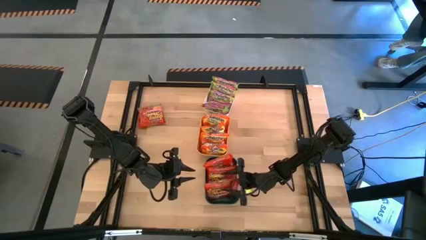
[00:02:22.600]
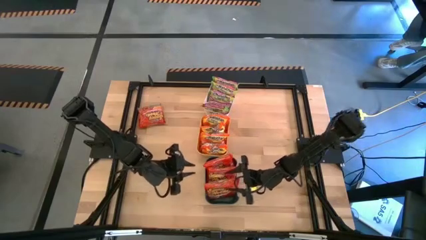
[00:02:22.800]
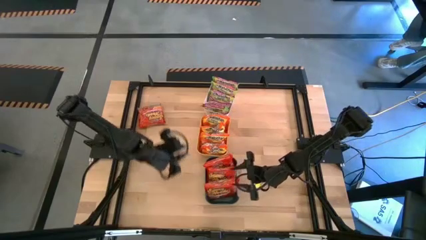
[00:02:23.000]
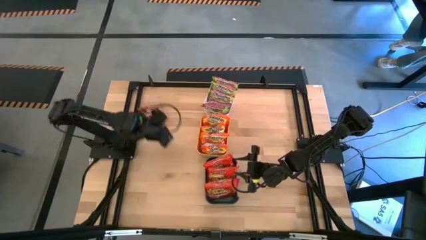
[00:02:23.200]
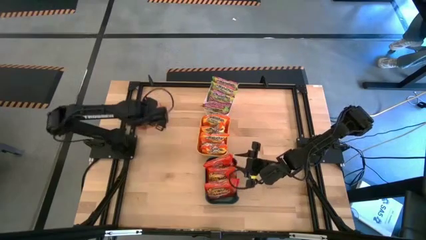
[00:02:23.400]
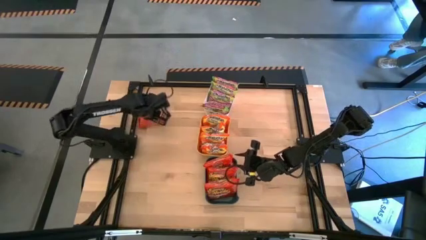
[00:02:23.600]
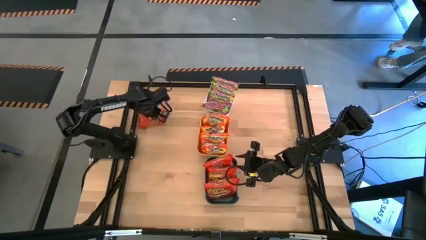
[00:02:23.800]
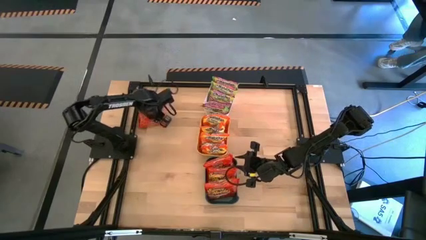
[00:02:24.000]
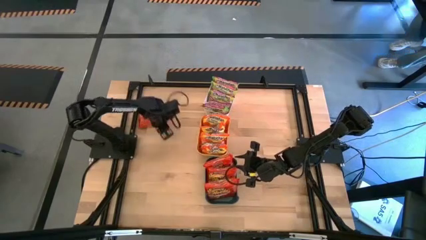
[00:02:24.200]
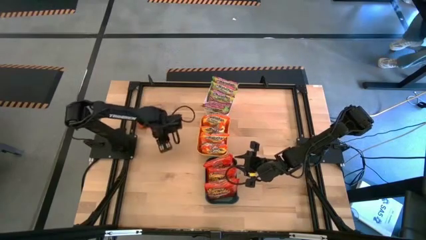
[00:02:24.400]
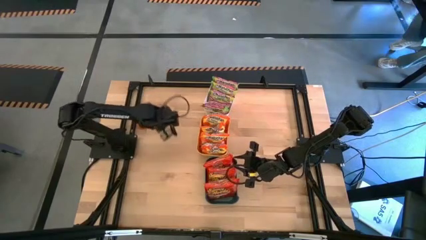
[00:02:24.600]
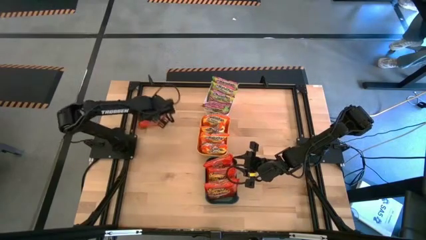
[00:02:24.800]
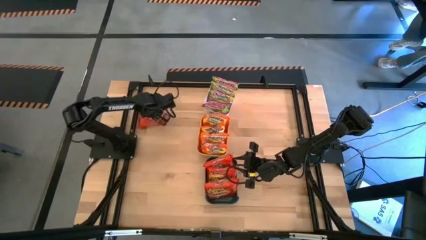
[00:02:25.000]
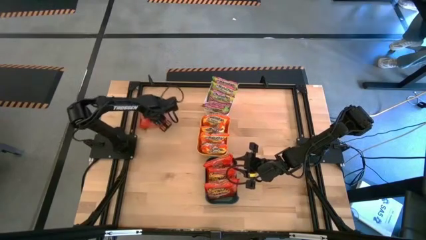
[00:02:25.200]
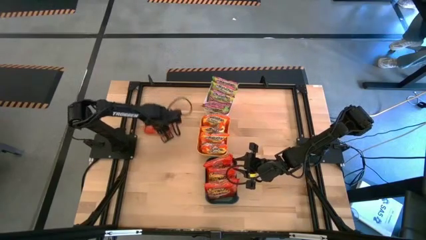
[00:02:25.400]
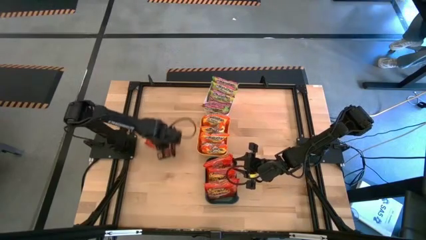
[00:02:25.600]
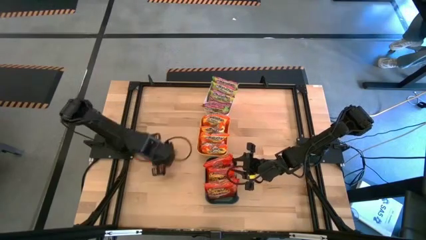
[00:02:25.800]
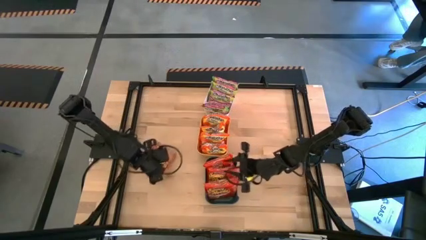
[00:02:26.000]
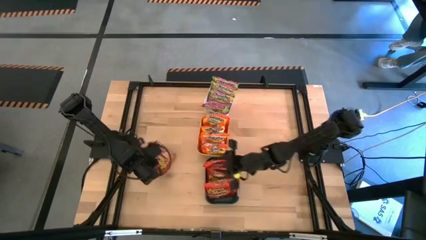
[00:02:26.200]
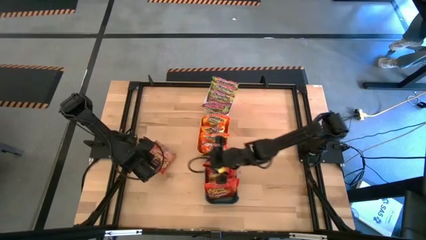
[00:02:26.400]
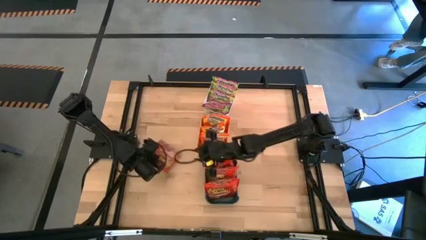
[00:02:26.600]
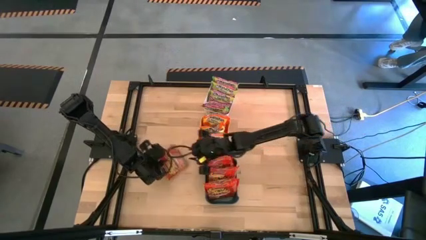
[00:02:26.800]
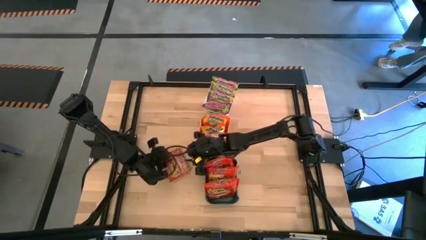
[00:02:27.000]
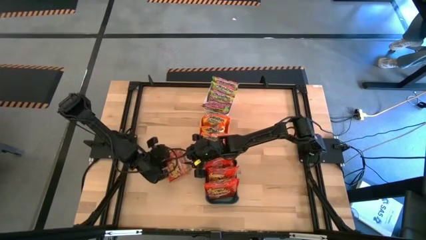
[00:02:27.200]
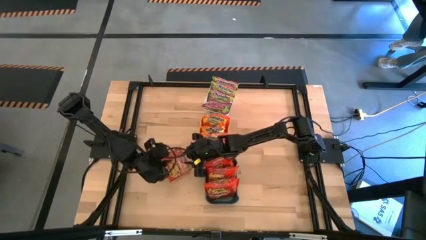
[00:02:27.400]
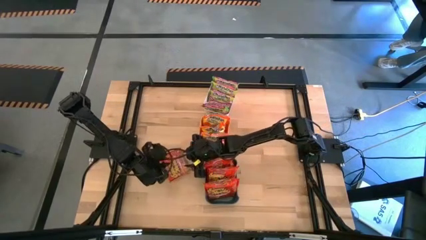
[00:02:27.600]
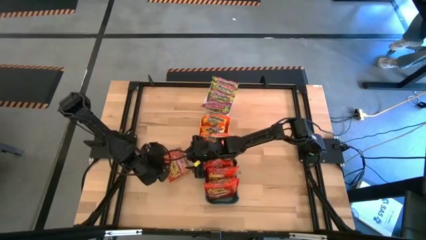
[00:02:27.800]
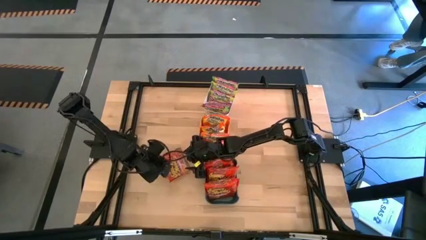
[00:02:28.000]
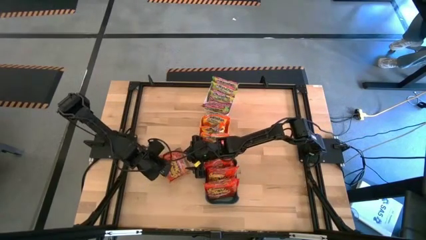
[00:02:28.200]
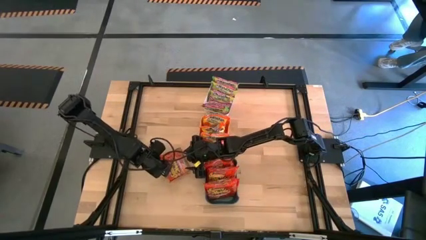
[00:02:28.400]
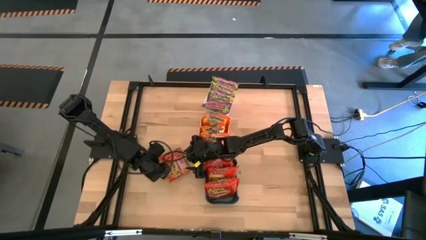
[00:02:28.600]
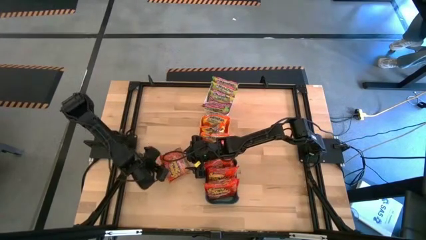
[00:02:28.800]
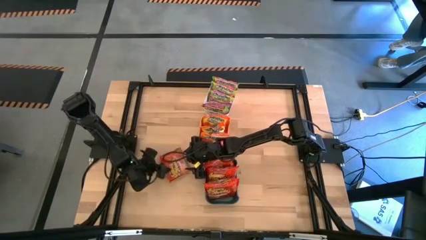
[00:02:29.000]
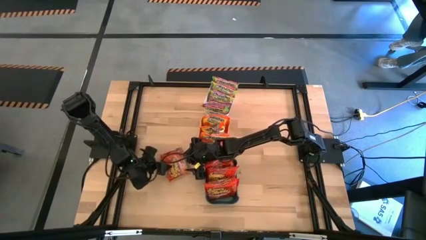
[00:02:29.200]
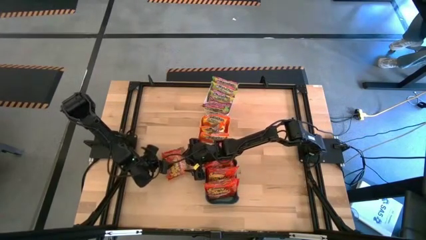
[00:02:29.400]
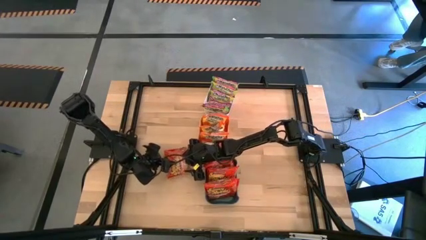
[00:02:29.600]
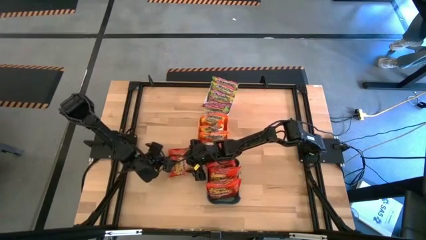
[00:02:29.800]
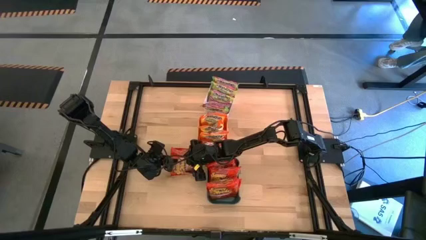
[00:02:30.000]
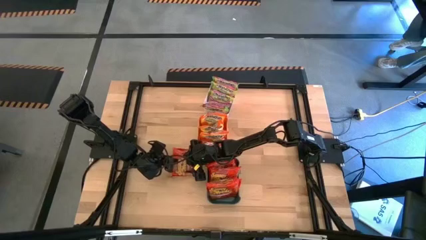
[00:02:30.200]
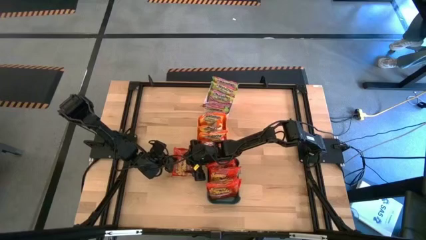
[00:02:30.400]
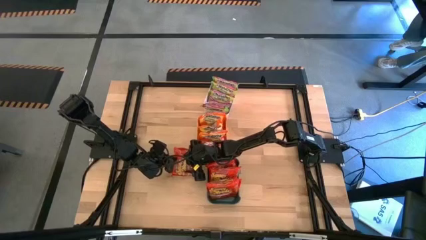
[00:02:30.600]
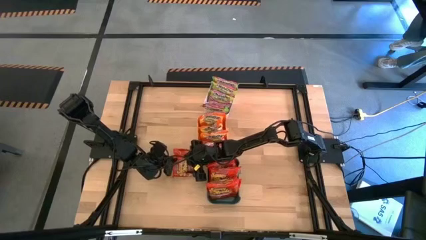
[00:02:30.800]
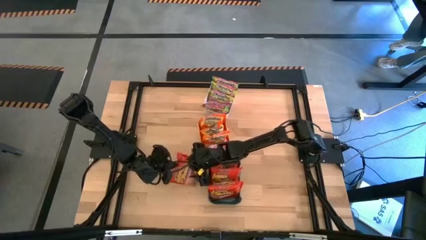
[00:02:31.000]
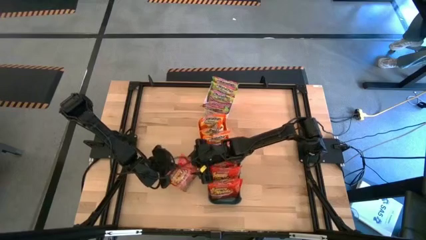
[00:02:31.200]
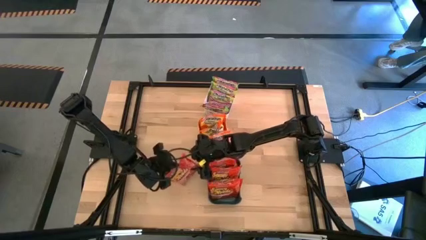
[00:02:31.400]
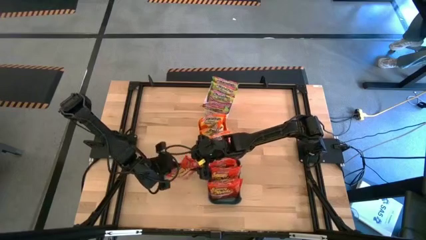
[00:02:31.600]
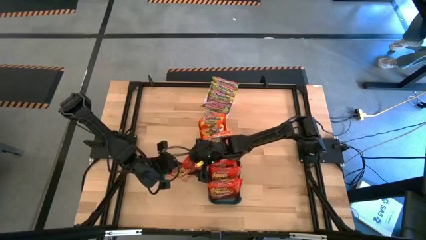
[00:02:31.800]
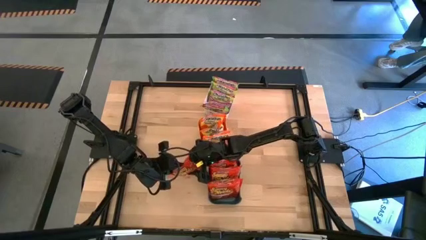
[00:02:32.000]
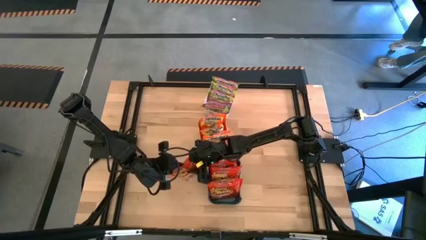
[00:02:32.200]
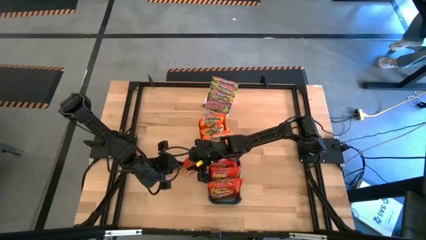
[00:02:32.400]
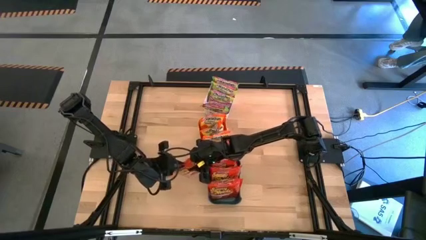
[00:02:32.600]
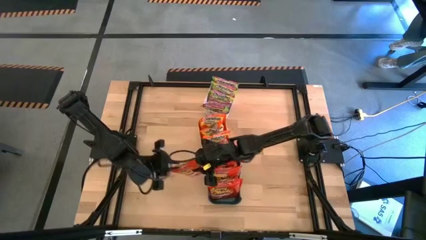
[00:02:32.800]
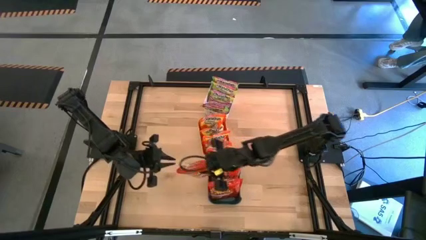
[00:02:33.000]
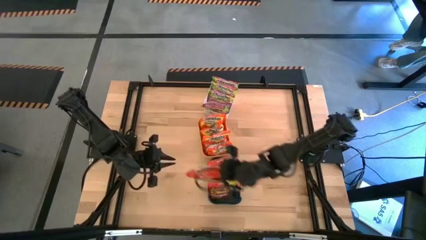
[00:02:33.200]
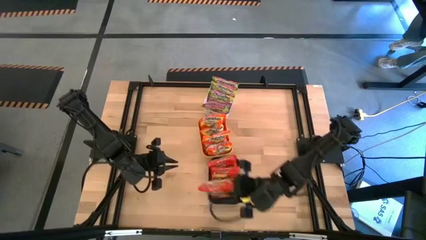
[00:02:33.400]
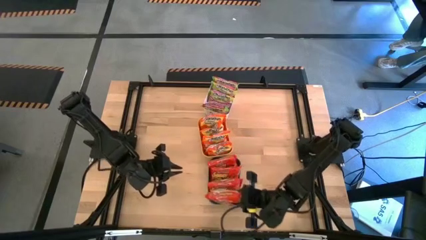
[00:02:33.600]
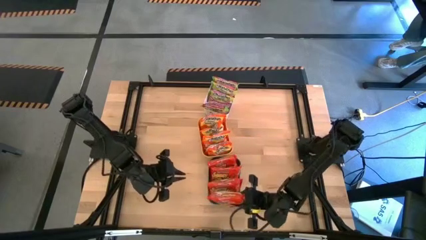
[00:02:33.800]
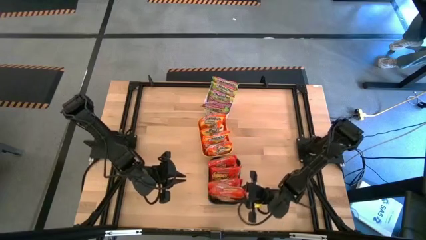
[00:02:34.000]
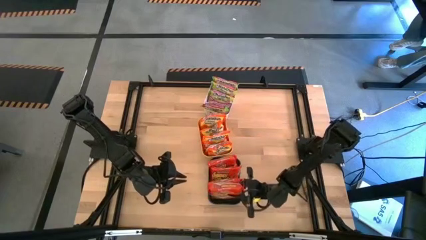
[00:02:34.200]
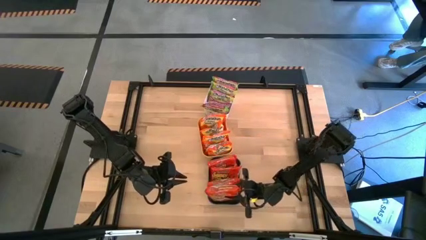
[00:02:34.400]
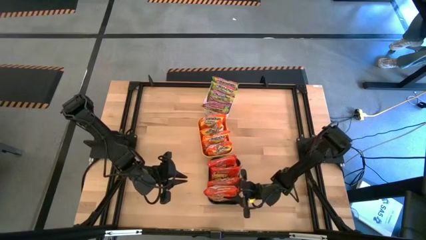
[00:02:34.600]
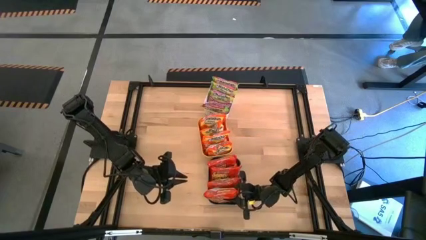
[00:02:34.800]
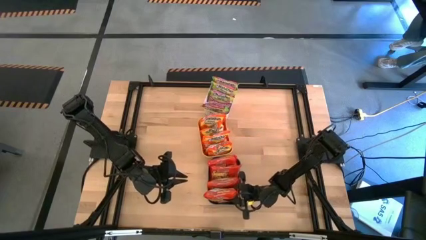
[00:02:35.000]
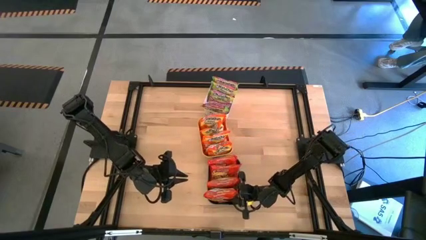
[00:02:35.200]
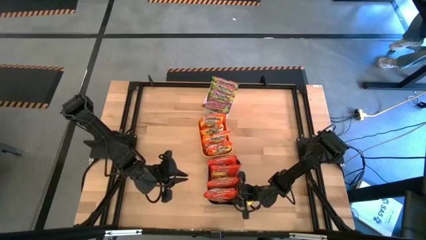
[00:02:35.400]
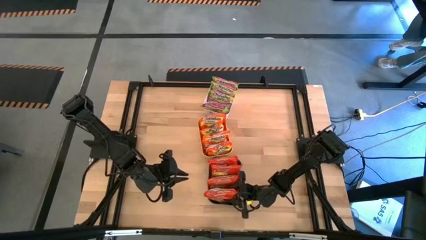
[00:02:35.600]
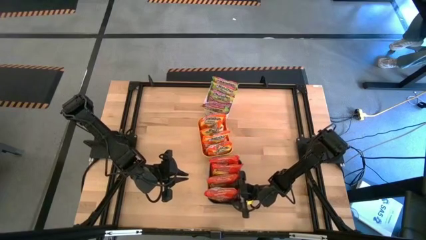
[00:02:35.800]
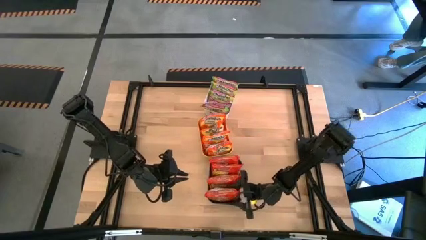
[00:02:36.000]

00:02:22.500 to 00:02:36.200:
Task: Sort Maruchan noodles
Put the orange noodle pack into the blue bin

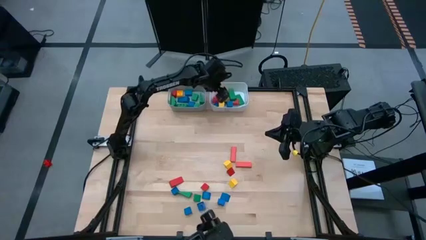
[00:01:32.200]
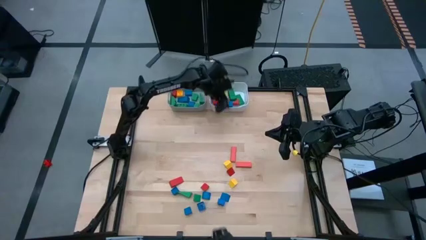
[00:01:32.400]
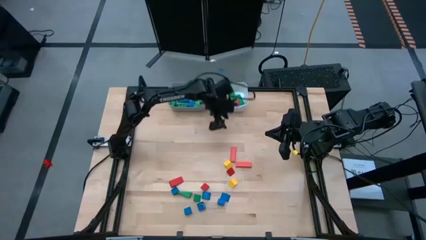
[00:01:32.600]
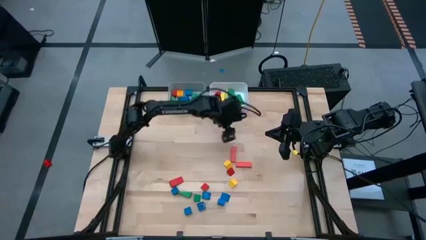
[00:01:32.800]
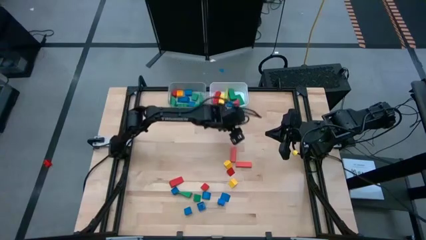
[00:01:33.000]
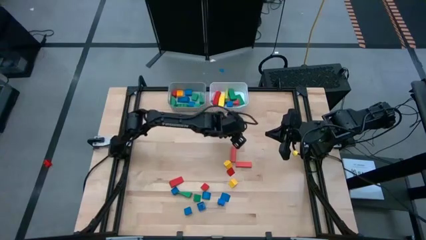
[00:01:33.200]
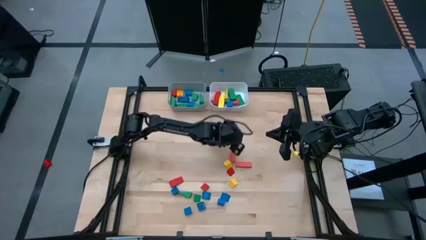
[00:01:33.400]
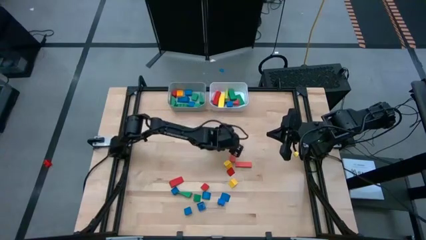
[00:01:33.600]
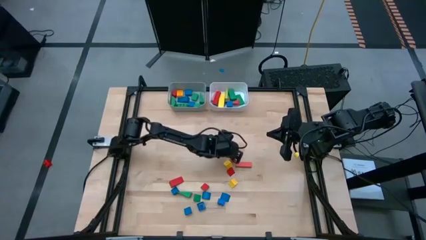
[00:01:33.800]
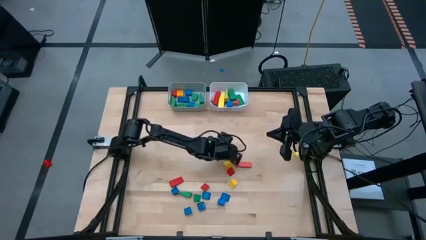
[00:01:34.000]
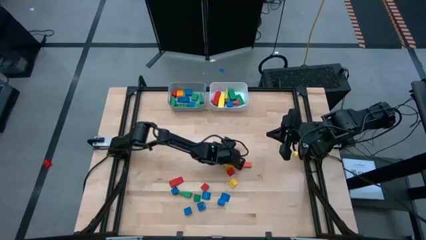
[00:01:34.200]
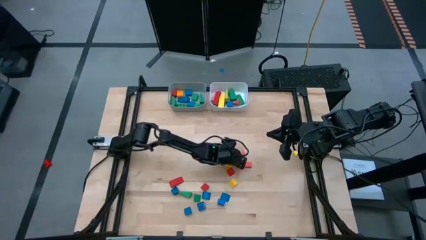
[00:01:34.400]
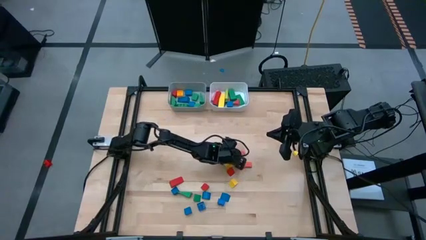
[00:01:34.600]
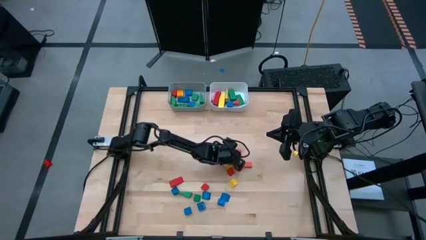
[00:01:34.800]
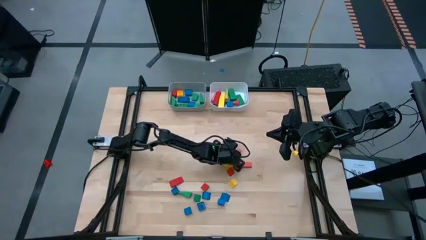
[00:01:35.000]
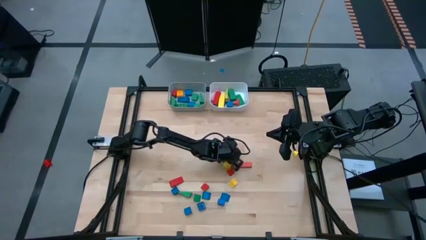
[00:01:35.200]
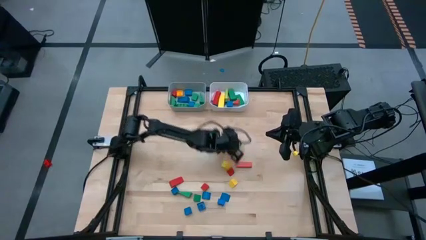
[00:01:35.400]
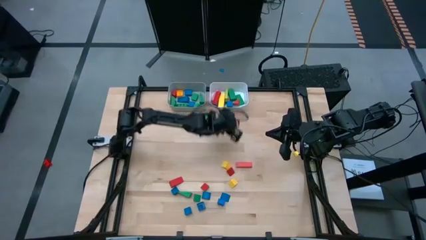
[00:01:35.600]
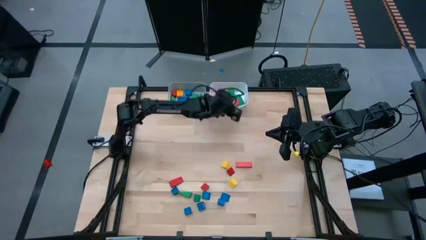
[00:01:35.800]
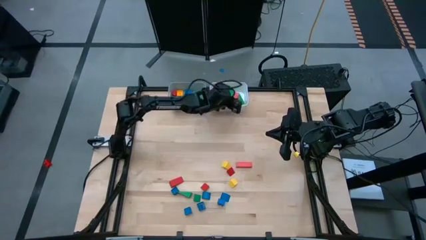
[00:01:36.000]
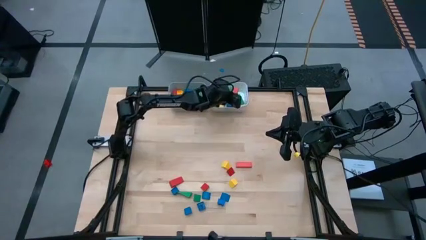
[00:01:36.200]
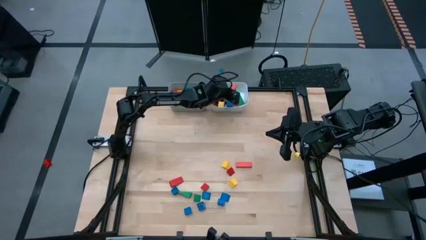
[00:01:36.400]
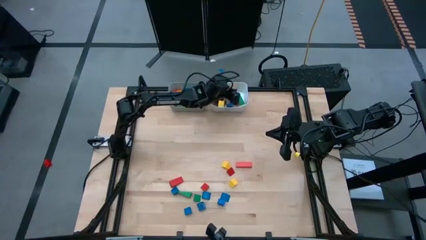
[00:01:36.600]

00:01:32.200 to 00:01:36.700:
Task: Sort blocks by size
Put the orange rectangular block into the white bin
